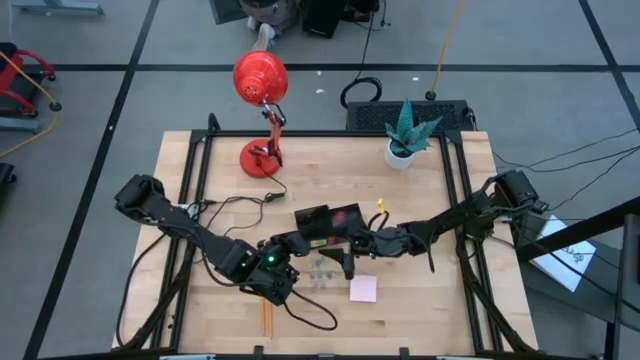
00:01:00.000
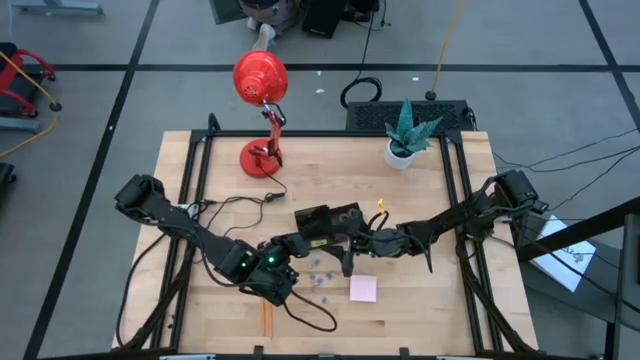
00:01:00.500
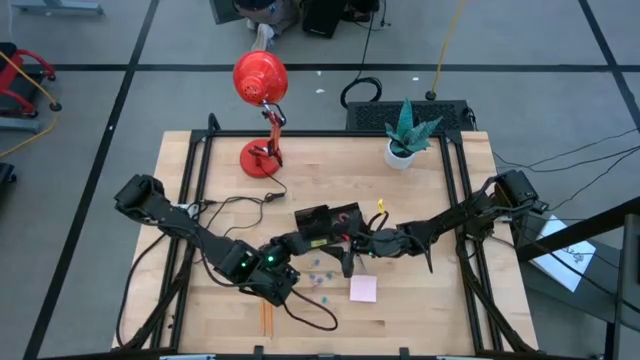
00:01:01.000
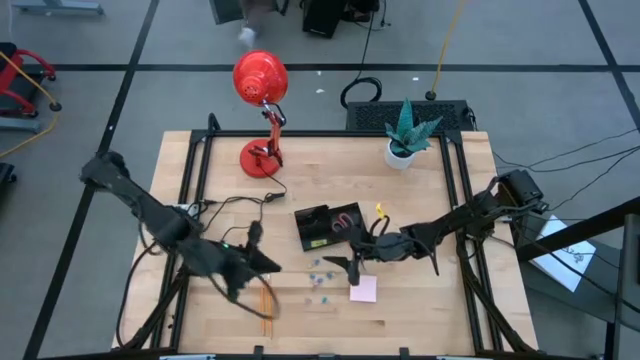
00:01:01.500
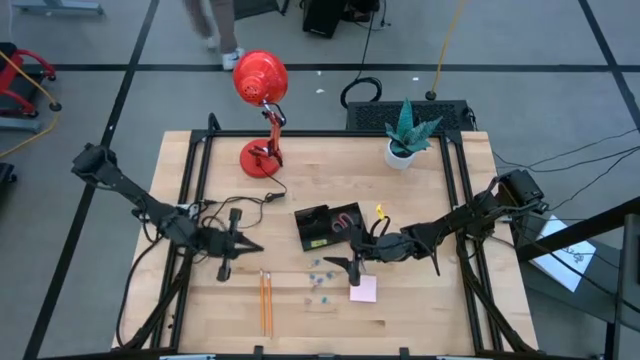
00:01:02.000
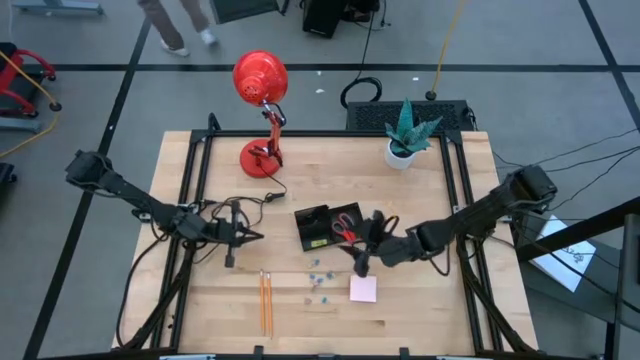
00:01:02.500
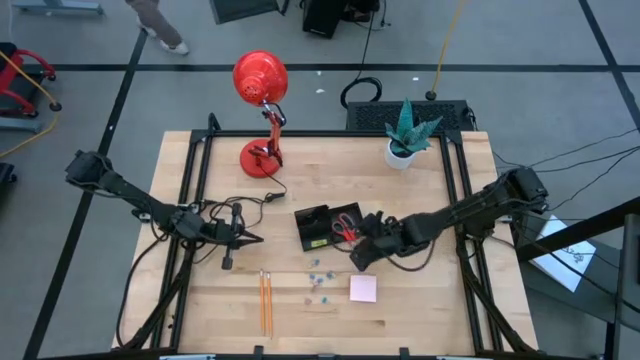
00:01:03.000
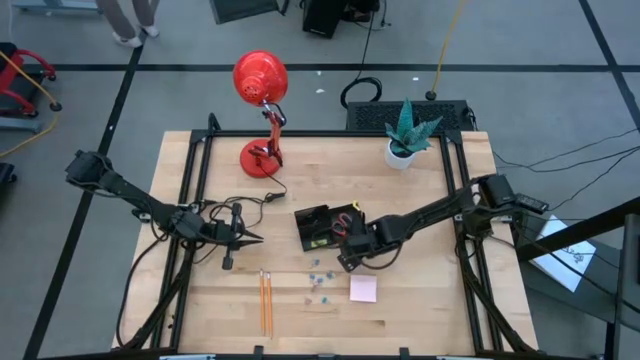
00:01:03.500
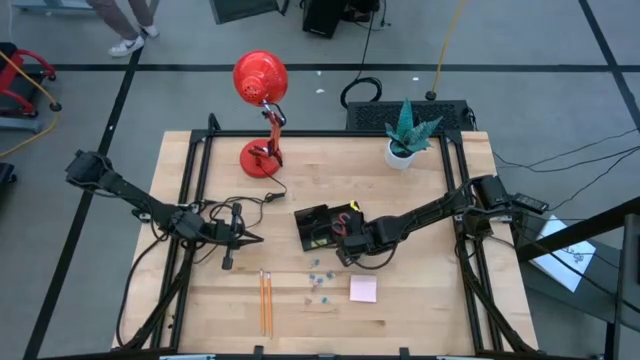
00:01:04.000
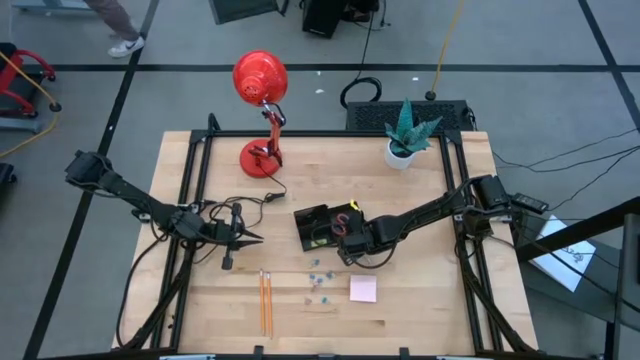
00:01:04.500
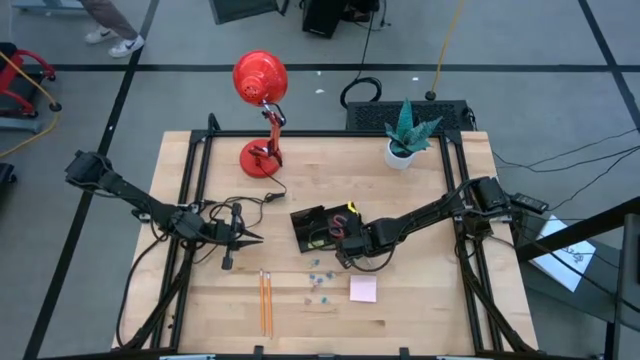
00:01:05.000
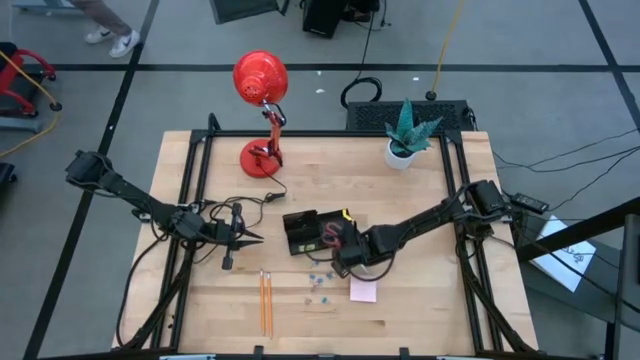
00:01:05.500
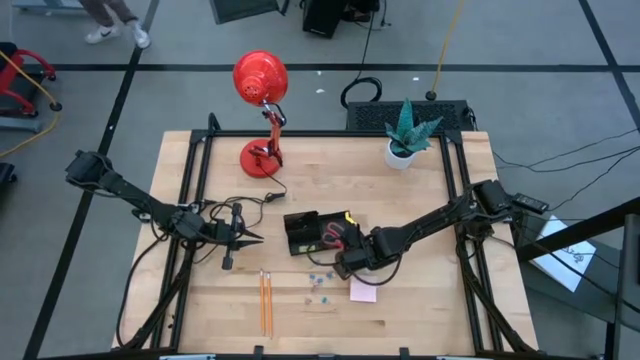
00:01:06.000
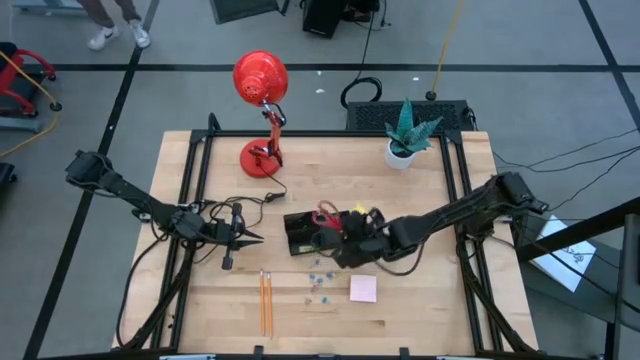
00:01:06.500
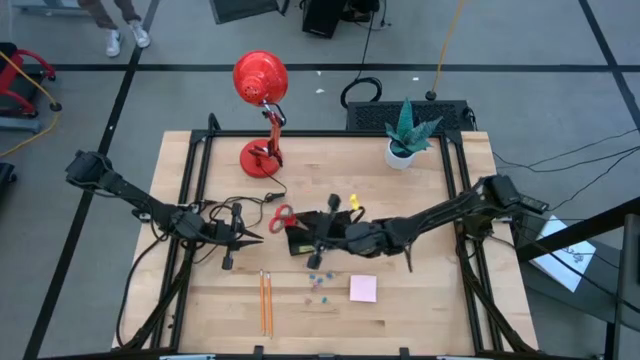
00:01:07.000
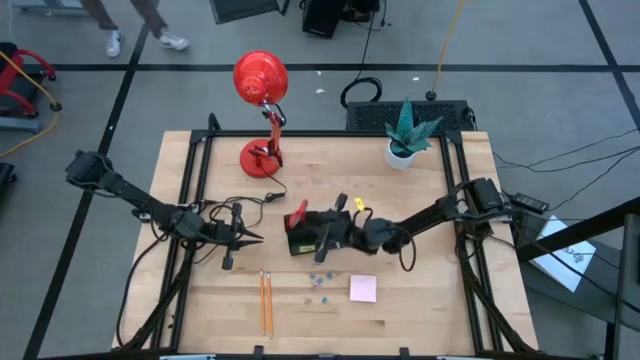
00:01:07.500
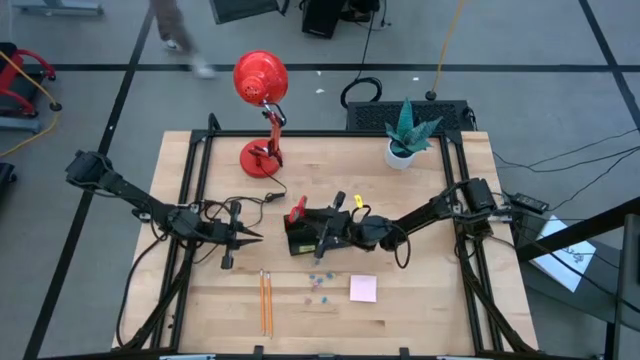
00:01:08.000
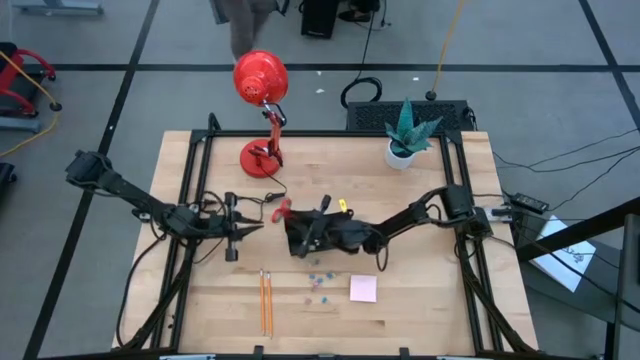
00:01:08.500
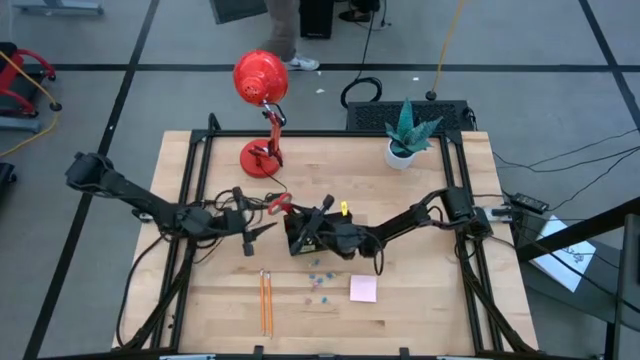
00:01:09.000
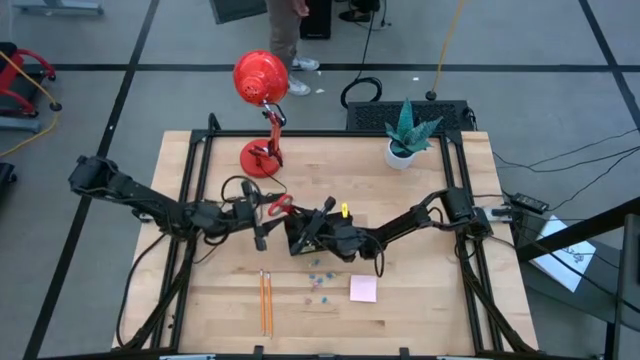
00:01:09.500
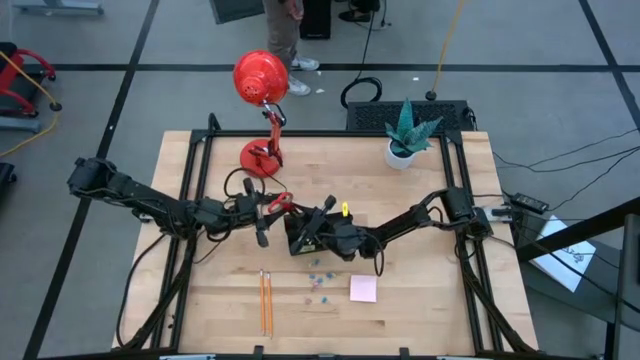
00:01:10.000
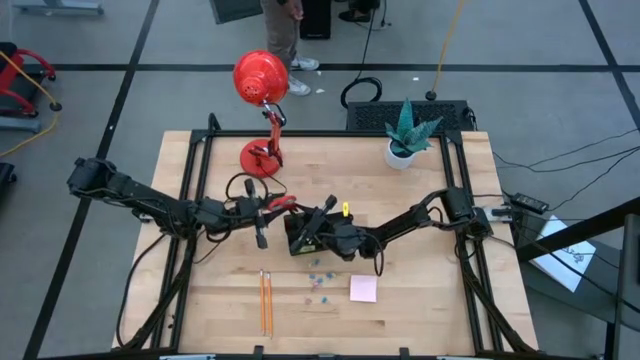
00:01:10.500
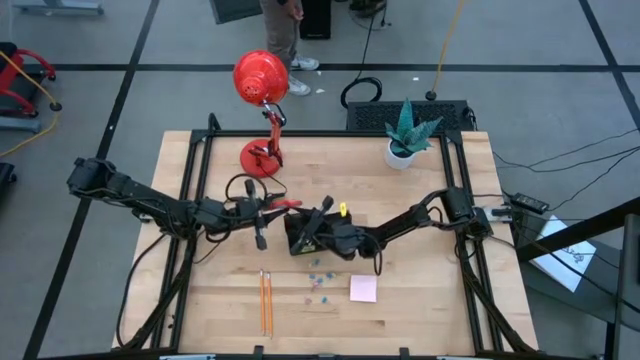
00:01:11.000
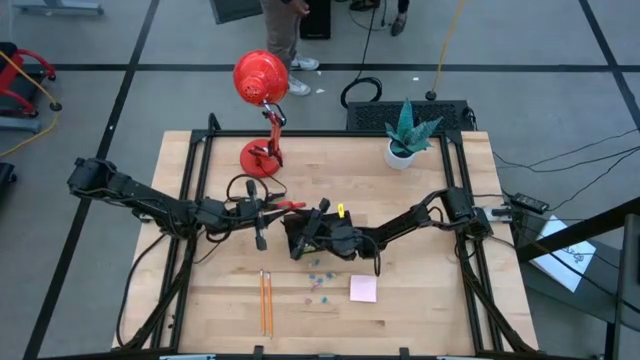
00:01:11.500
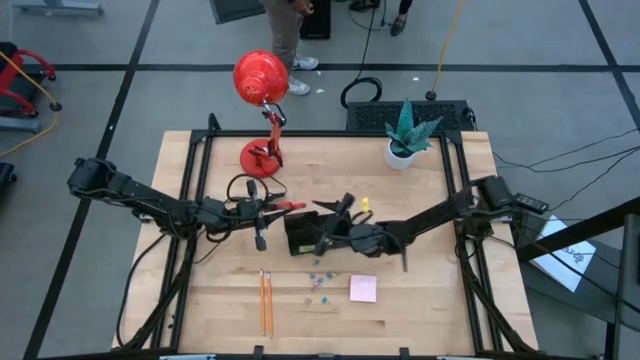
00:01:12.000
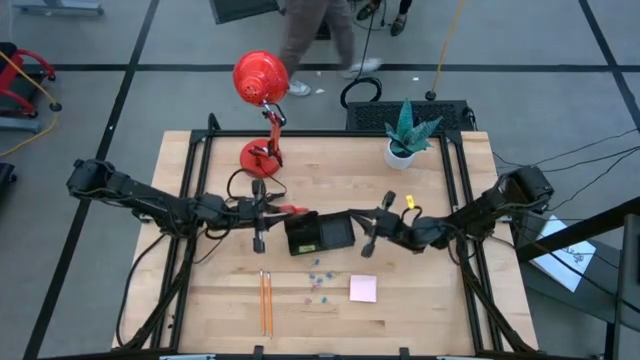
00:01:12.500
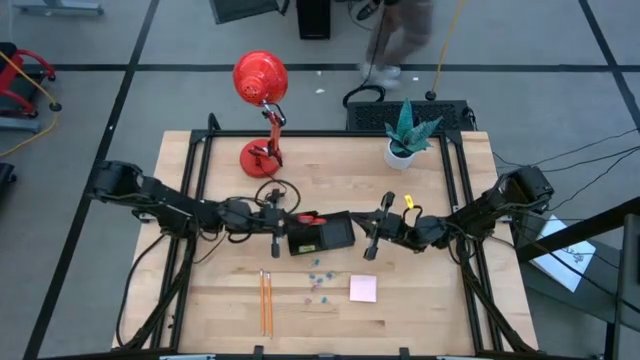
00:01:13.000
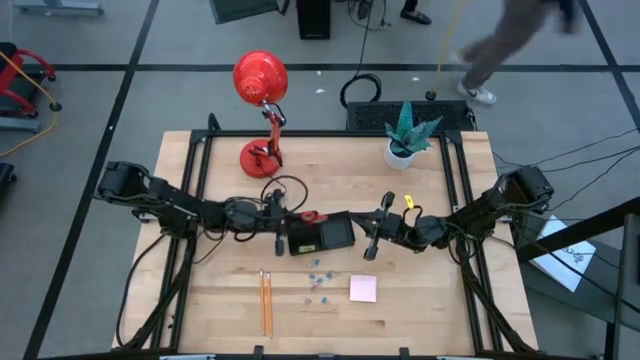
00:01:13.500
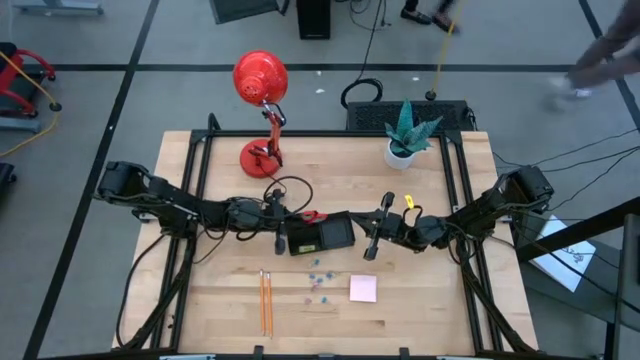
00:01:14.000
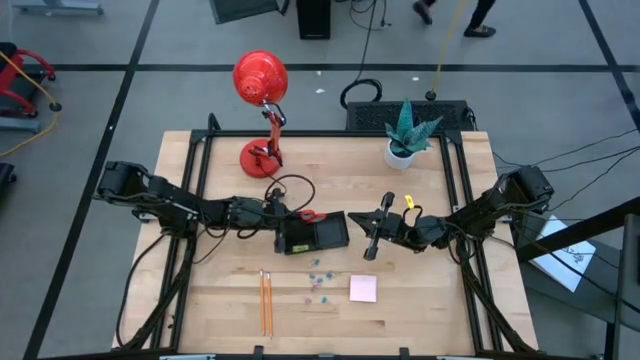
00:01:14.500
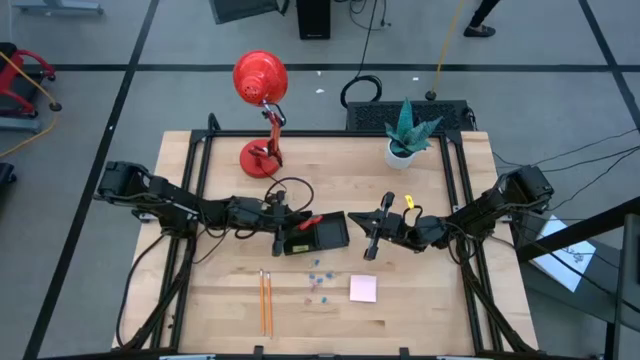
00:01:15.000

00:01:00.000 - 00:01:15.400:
Task: Pick and place office supplies into organizer
Put the scissors into the desk organizer

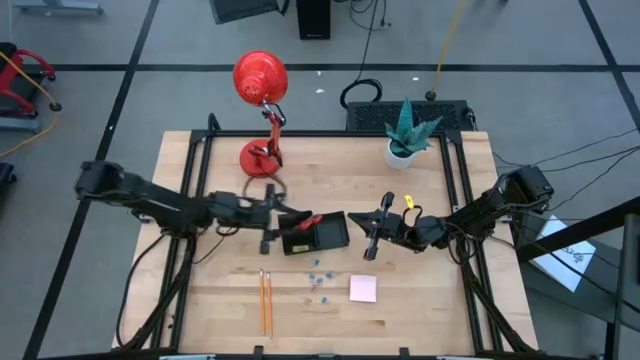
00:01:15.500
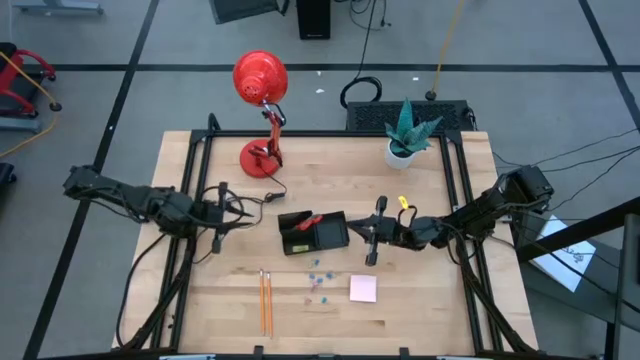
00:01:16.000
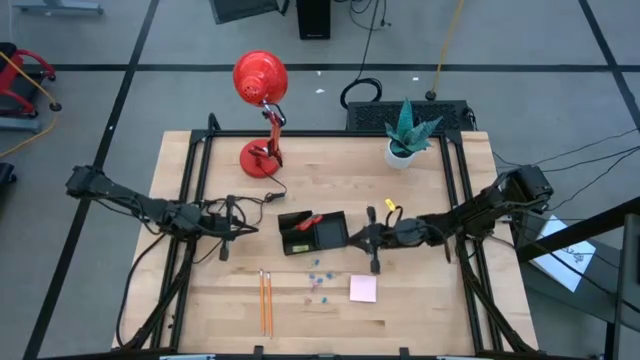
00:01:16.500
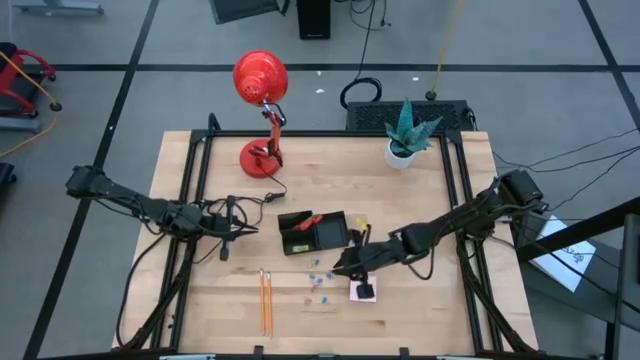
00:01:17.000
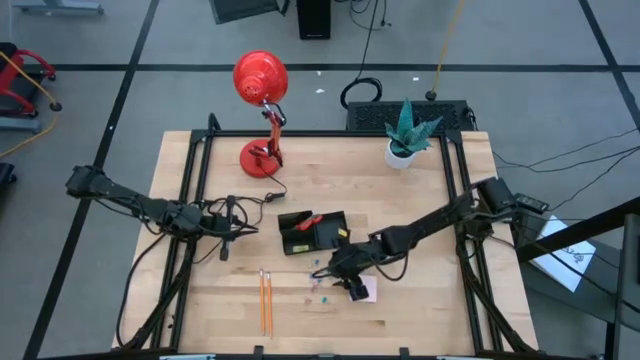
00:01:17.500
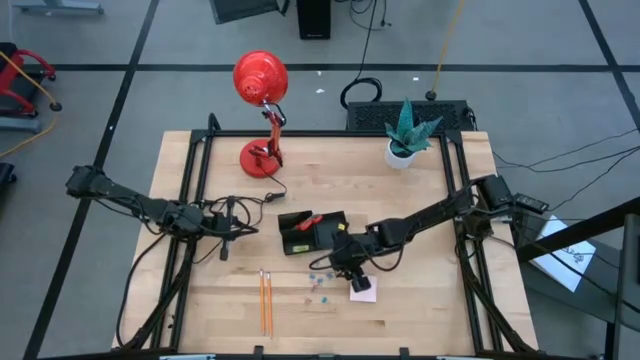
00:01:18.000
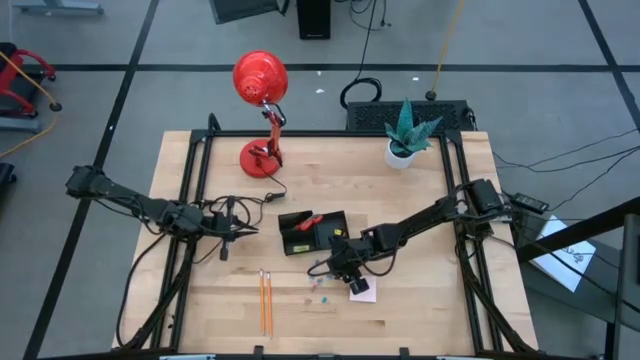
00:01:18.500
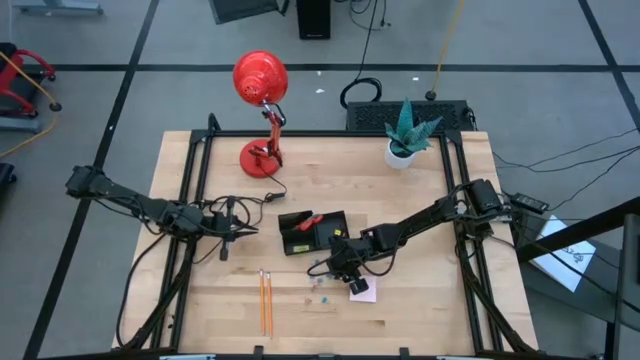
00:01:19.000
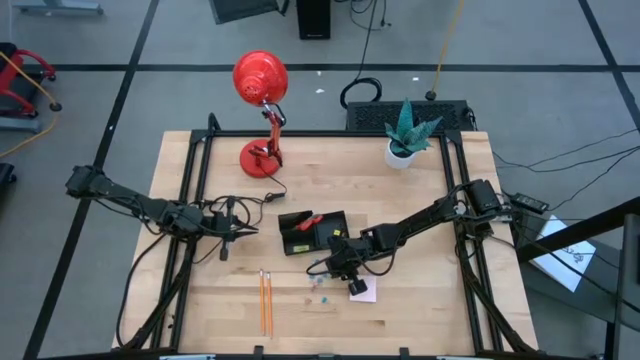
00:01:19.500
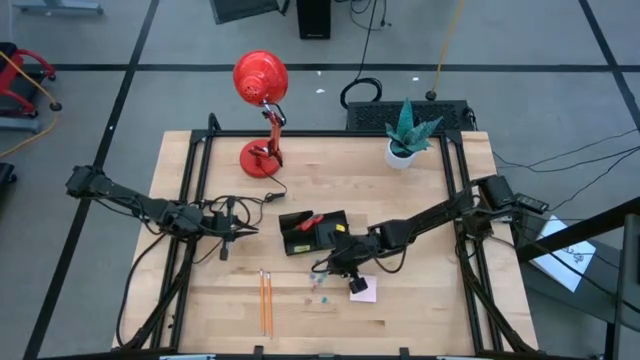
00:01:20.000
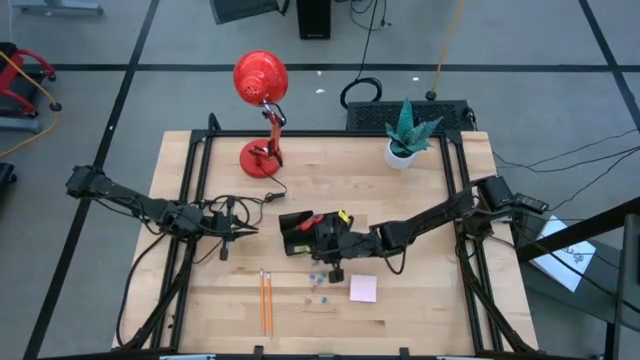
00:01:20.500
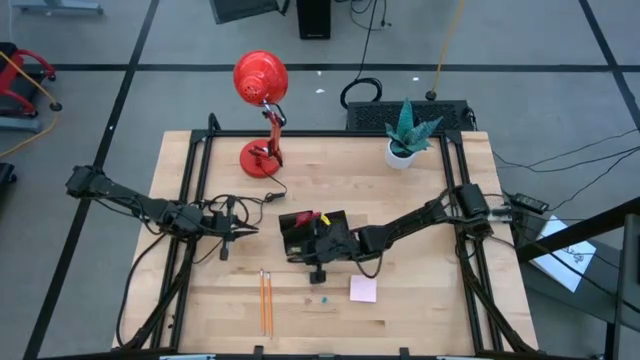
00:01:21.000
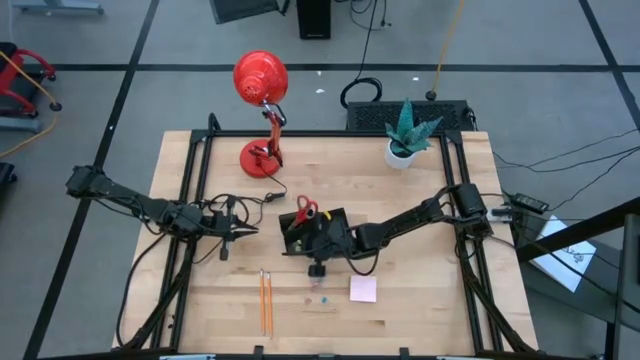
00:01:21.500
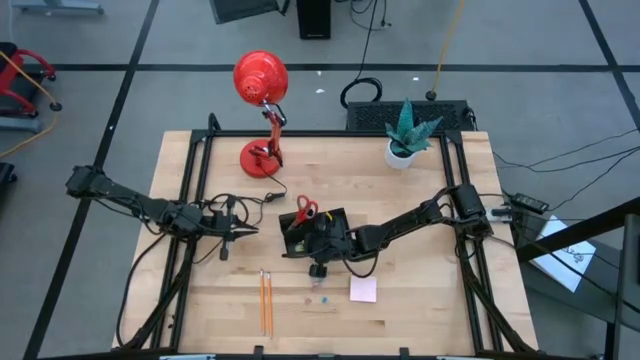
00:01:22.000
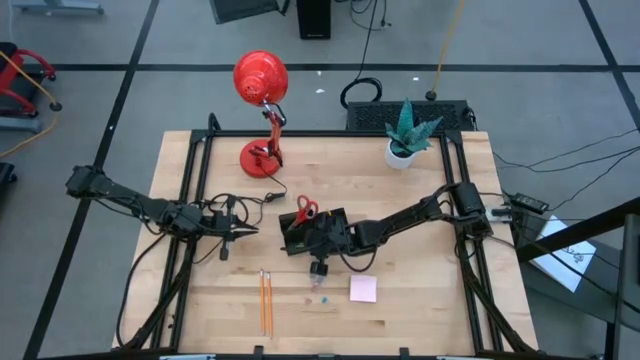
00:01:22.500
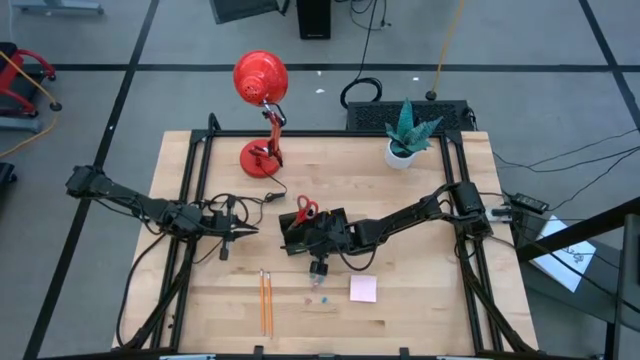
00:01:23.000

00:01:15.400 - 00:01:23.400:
Put the green binder clip into the desk organizer
